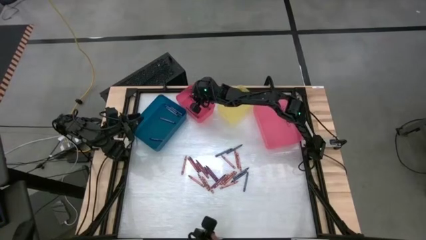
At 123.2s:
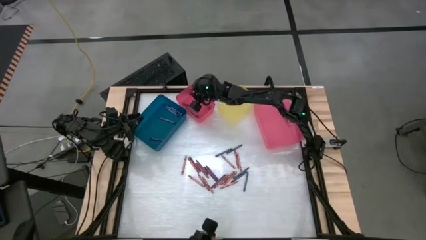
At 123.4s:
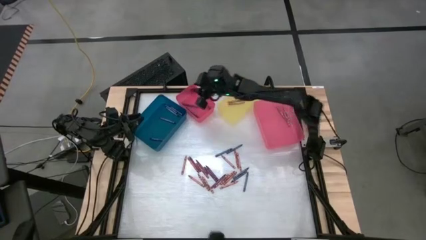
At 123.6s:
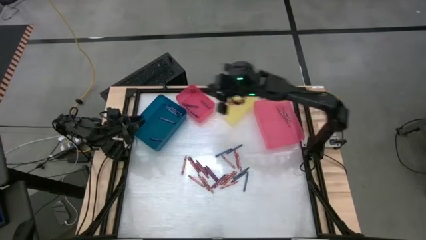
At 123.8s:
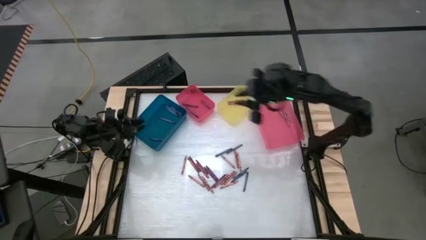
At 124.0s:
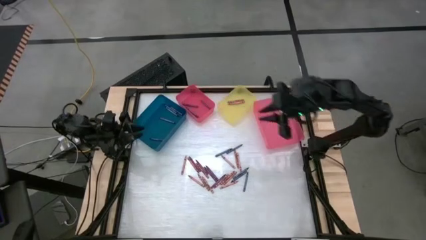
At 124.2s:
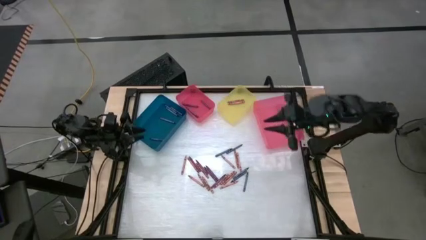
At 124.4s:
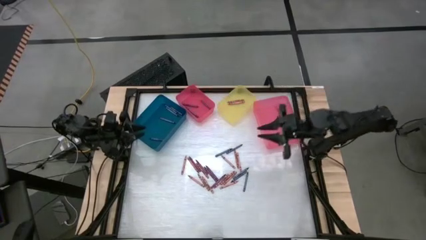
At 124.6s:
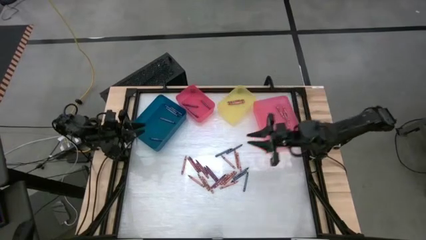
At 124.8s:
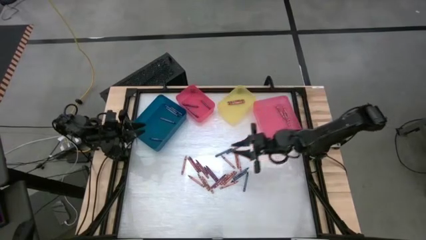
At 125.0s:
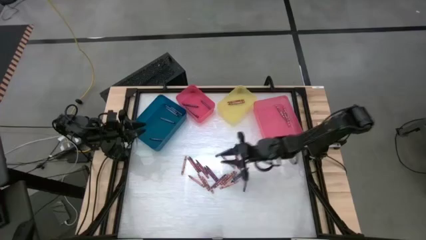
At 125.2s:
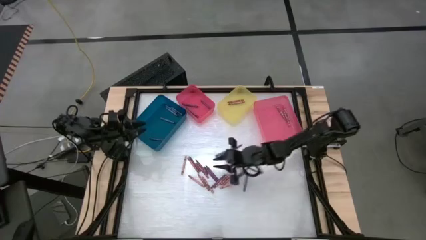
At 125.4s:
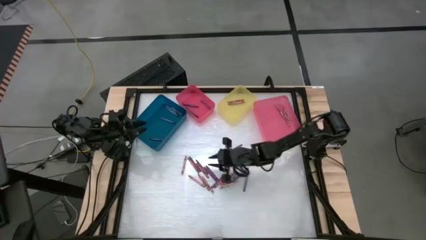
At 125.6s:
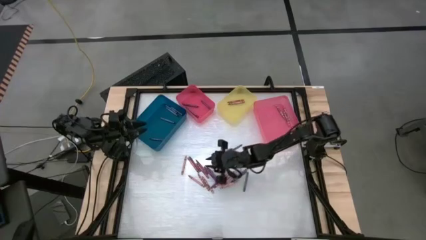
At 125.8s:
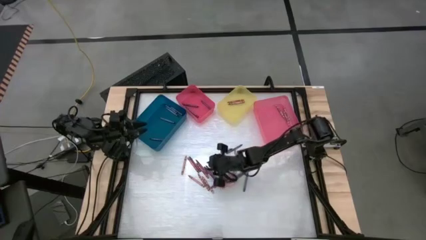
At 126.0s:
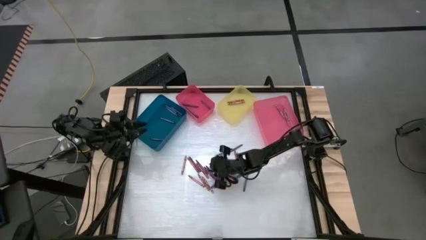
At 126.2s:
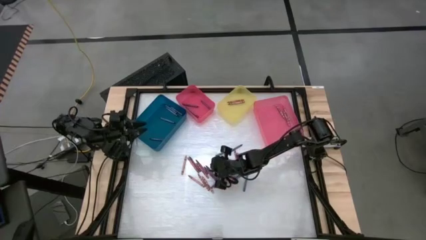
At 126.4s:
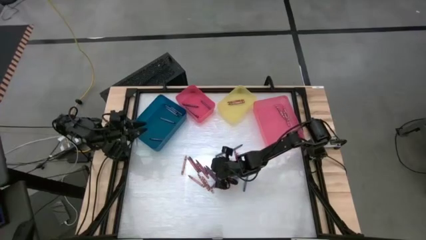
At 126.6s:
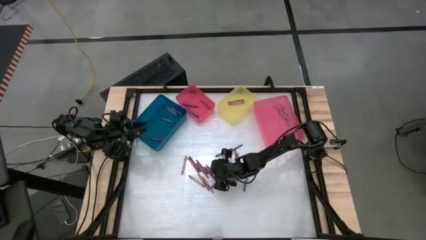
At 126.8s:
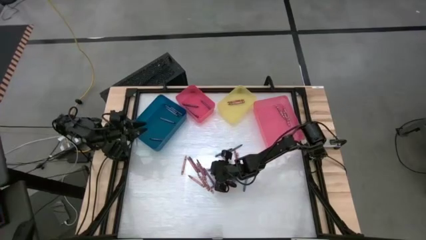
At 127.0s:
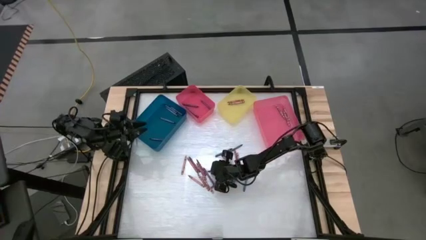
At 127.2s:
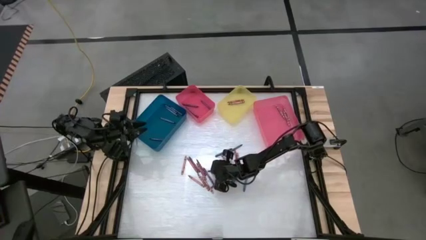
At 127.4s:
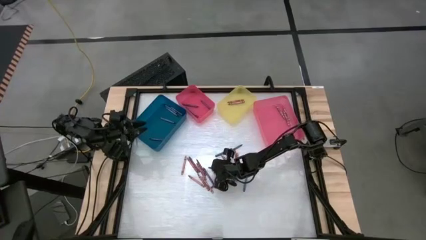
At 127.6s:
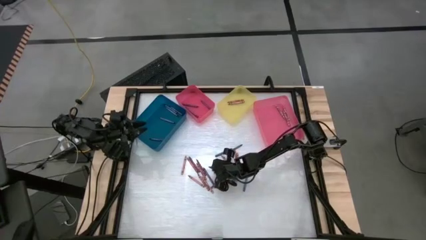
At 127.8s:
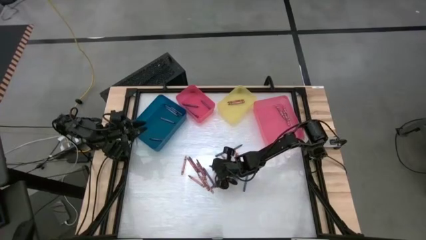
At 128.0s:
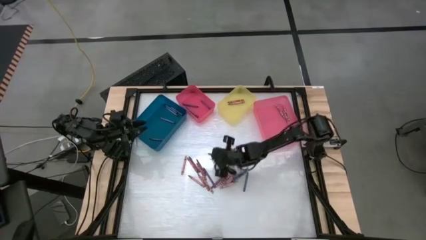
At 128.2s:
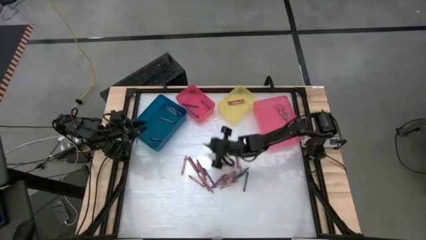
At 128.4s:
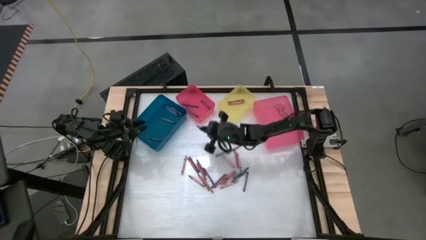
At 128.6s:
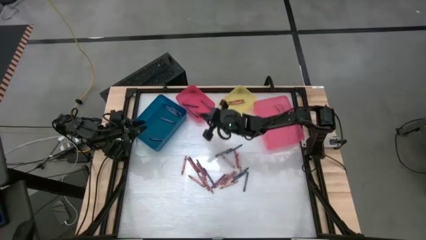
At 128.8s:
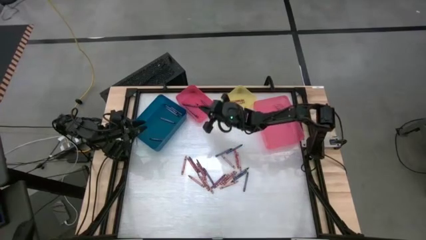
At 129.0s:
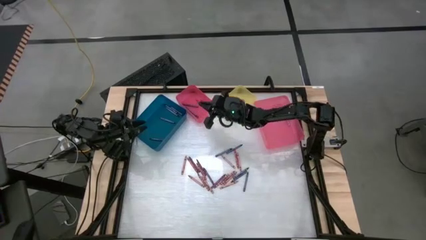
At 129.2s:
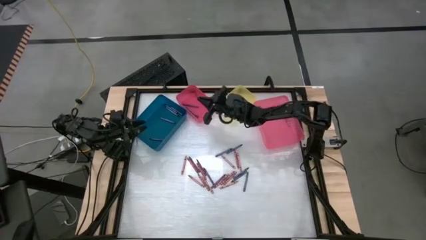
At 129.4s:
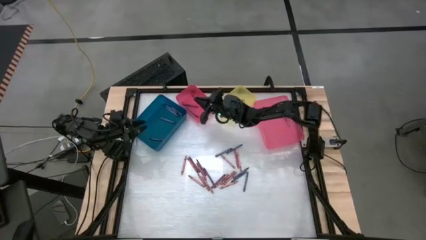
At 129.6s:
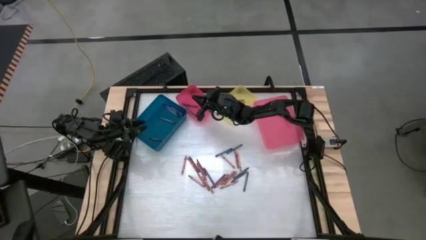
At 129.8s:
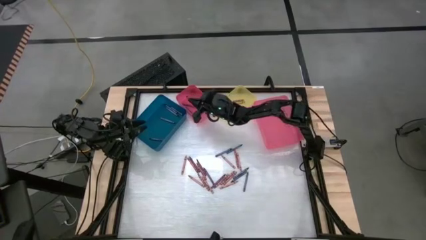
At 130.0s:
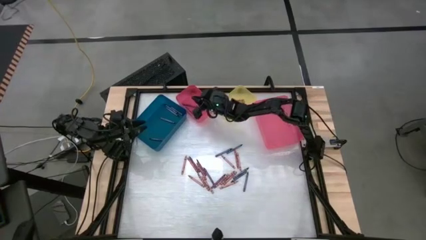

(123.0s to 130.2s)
Task: Sort crayons
Put the violet crayon into the left pink bin

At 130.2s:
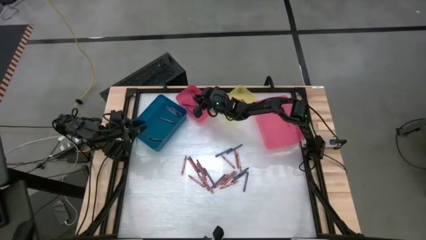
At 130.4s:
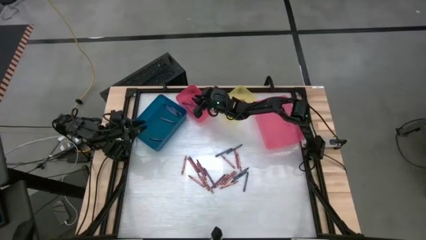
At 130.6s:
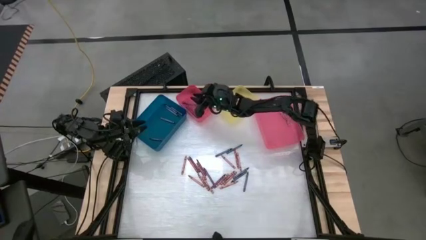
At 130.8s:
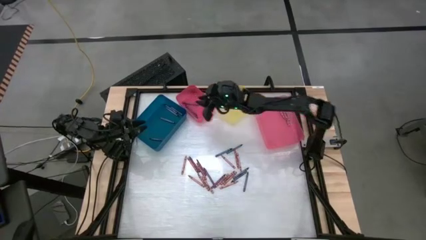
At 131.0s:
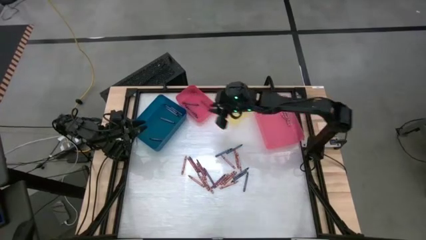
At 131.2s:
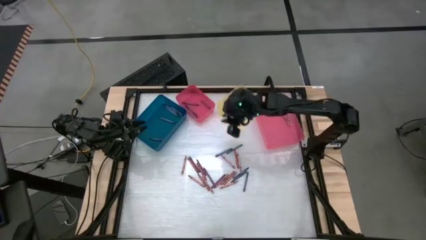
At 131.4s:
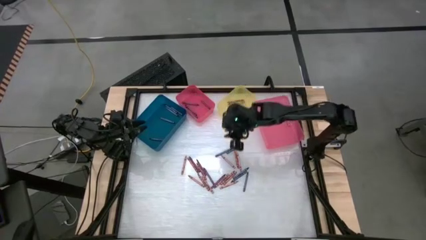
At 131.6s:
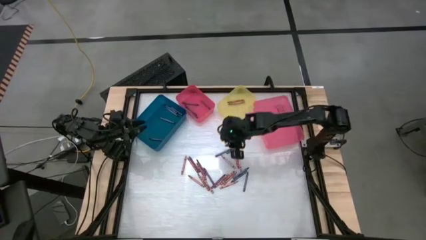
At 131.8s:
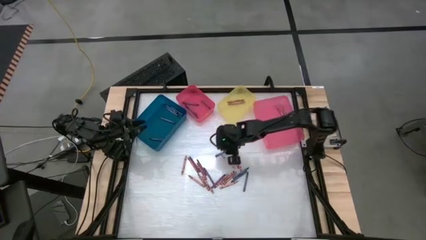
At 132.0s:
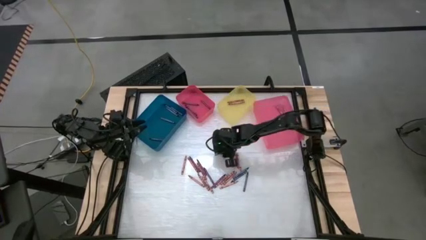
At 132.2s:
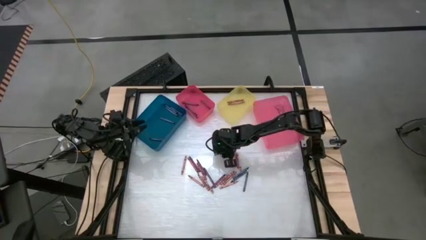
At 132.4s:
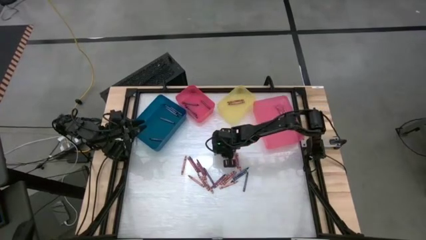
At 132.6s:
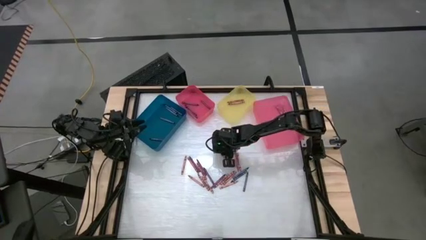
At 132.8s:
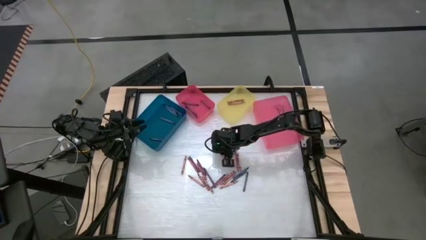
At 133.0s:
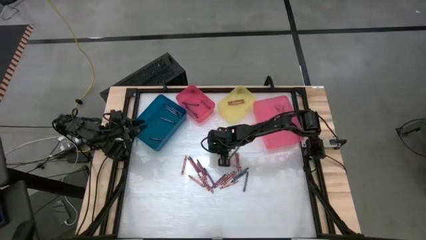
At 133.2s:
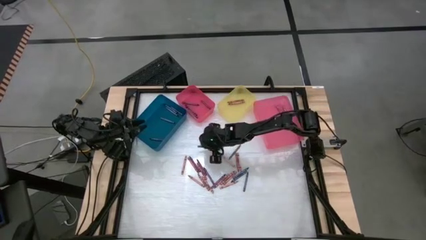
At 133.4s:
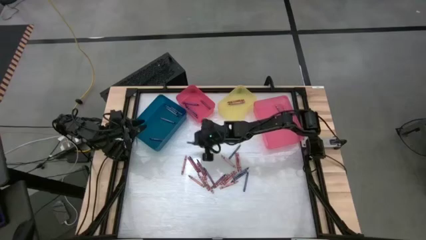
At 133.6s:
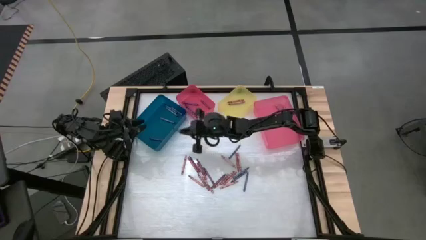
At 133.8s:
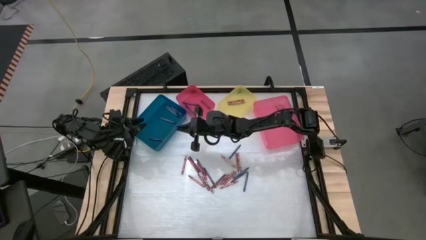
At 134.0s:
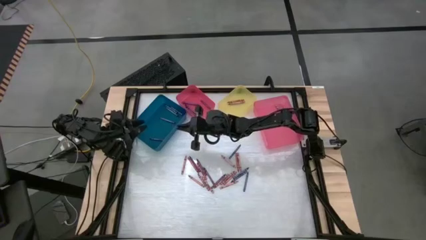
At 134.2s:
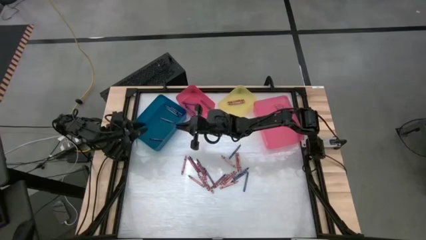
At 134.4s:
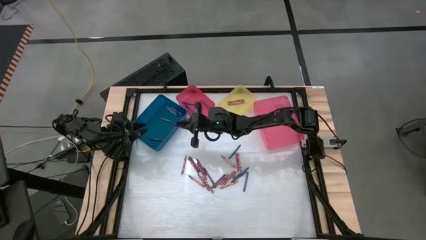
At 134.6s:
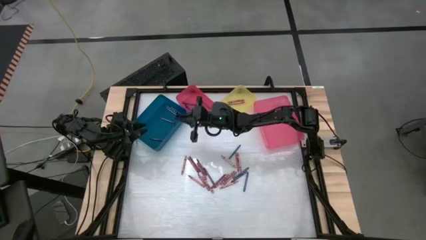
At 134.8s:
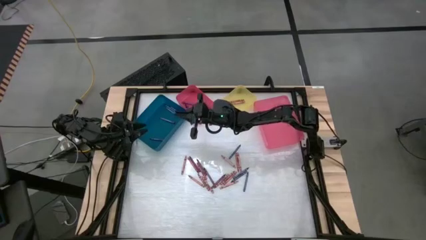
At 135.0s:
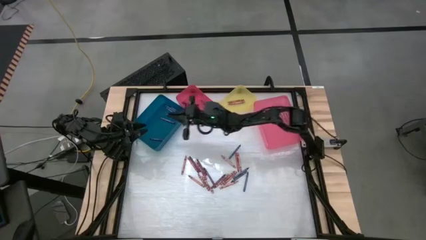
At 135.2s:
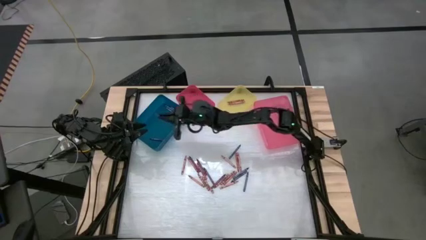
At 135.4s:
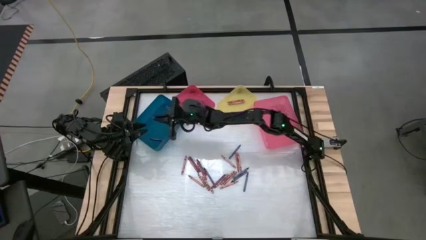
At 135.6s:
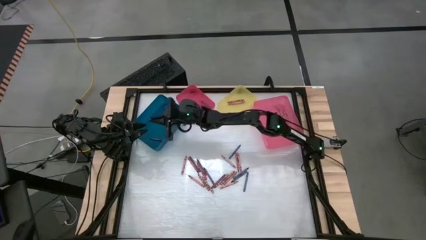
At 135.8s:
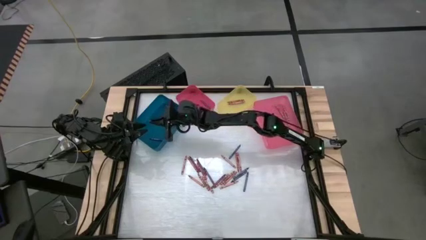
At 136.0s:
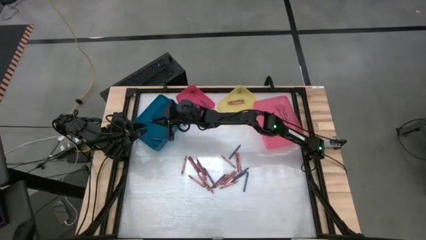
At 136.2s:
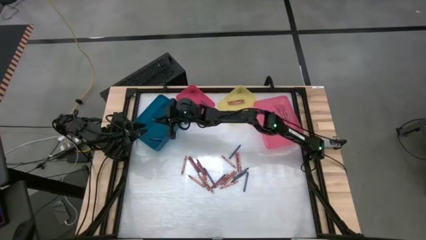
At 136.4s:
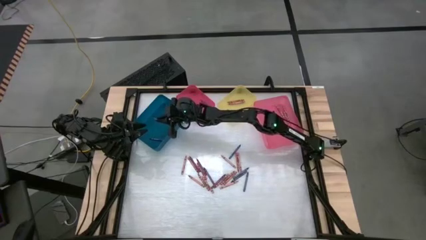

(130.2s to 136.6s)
Put the blue crayon into the blue bin
